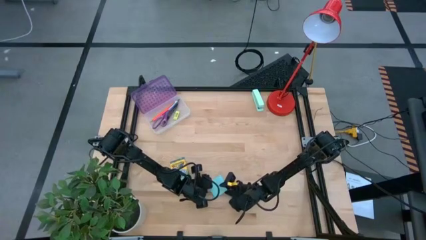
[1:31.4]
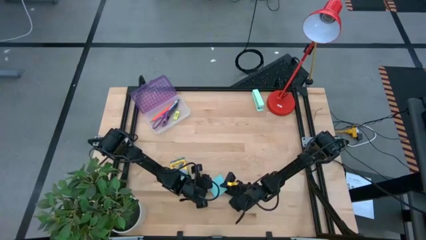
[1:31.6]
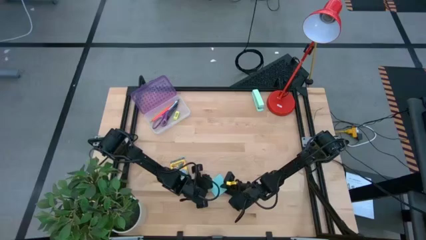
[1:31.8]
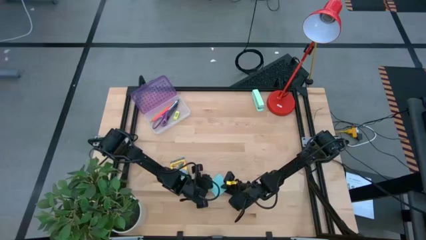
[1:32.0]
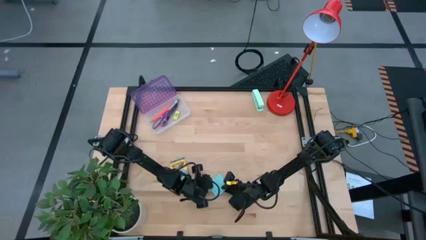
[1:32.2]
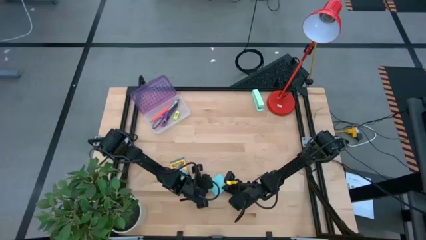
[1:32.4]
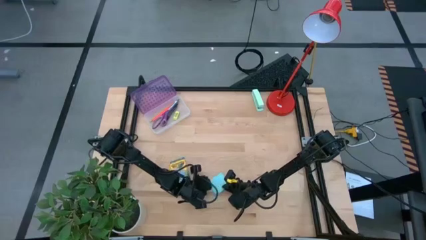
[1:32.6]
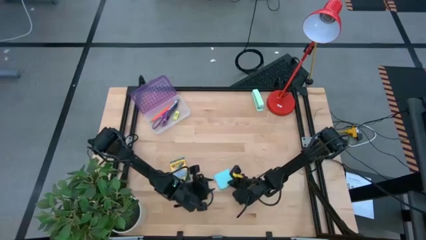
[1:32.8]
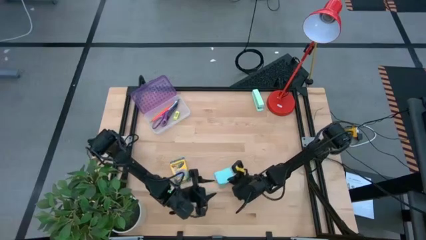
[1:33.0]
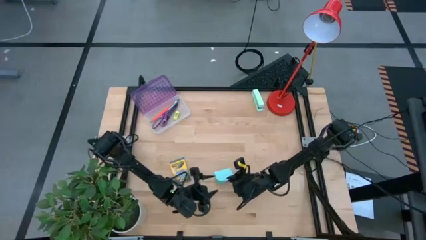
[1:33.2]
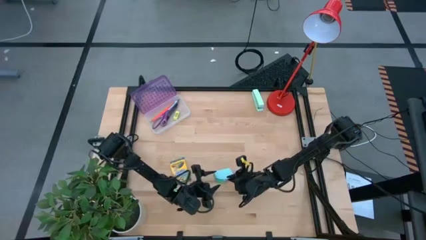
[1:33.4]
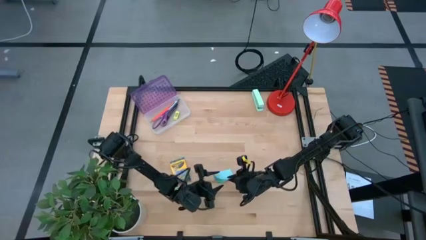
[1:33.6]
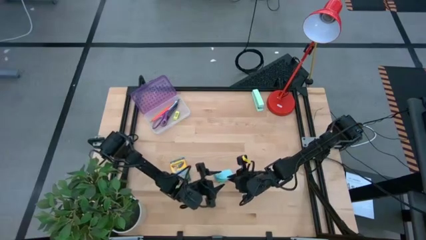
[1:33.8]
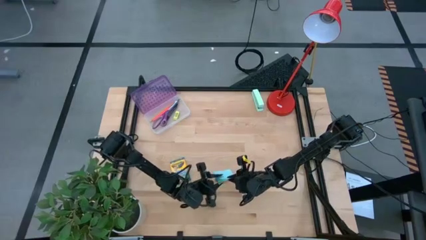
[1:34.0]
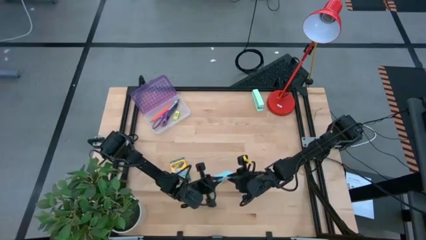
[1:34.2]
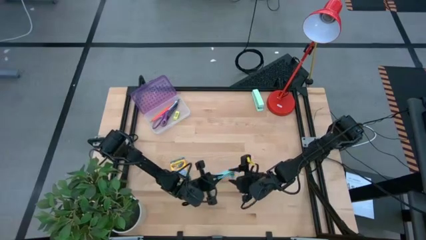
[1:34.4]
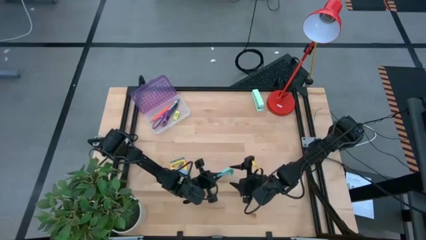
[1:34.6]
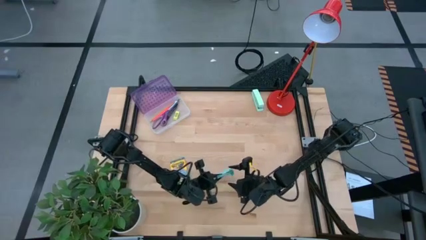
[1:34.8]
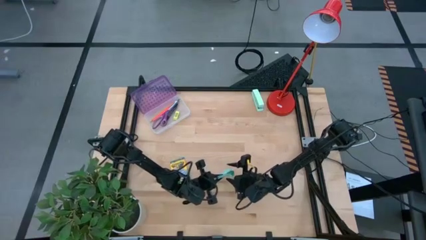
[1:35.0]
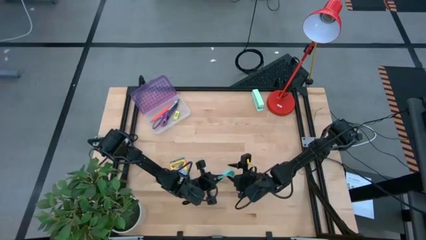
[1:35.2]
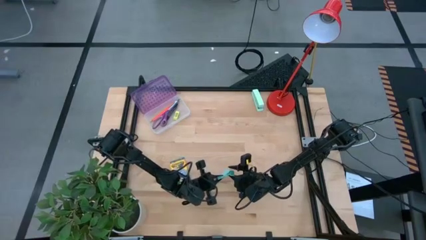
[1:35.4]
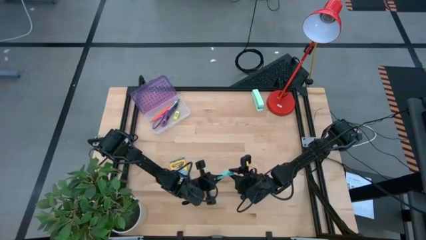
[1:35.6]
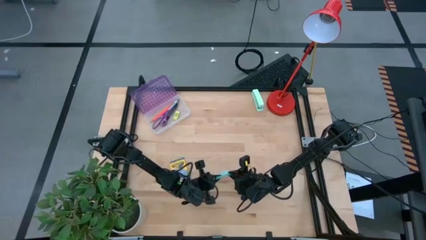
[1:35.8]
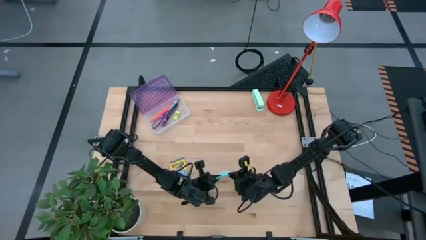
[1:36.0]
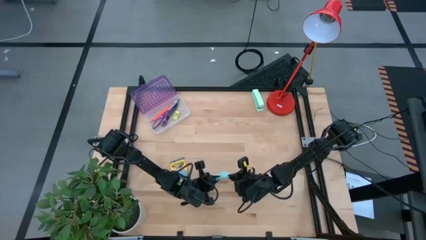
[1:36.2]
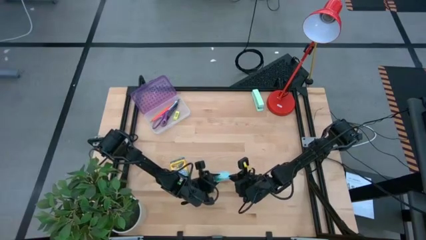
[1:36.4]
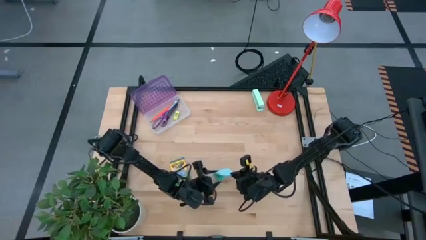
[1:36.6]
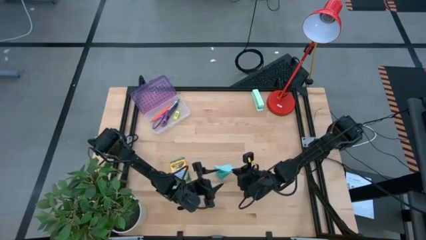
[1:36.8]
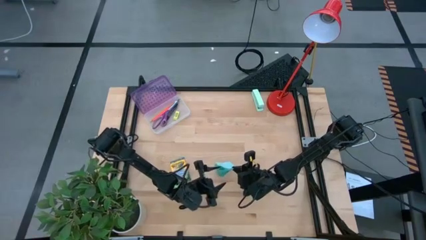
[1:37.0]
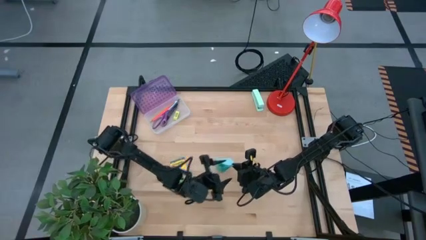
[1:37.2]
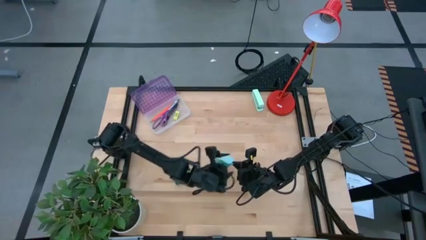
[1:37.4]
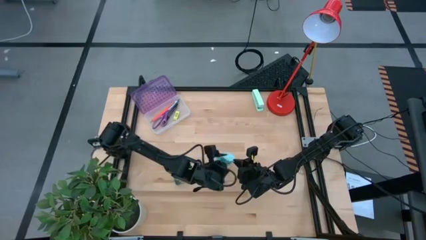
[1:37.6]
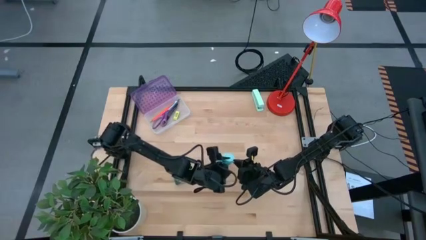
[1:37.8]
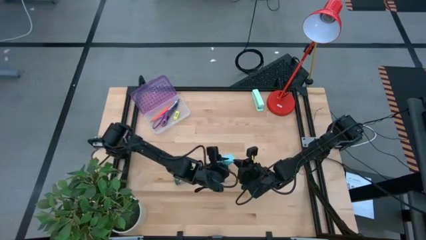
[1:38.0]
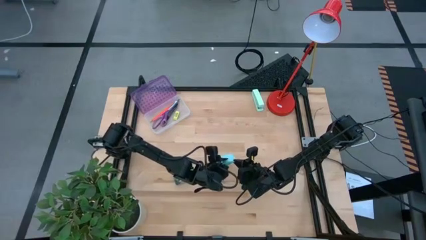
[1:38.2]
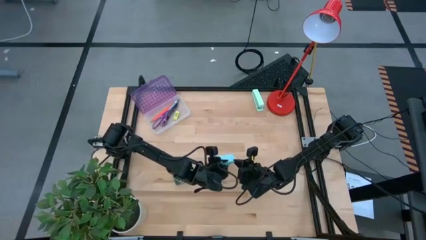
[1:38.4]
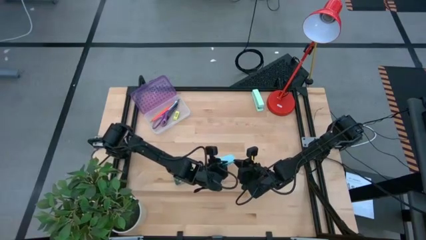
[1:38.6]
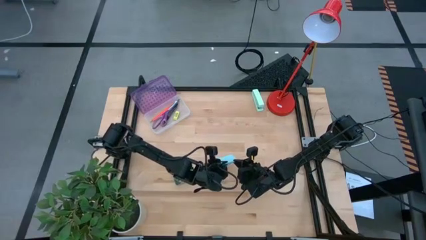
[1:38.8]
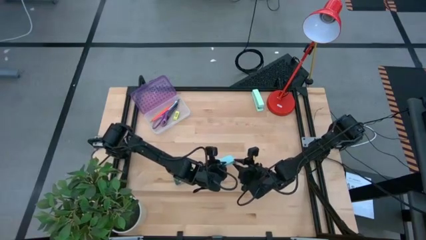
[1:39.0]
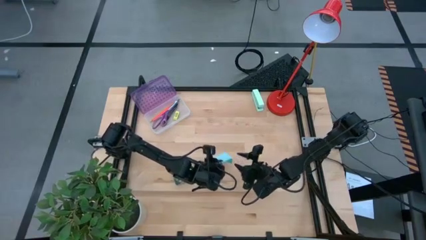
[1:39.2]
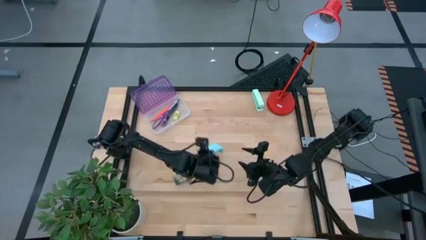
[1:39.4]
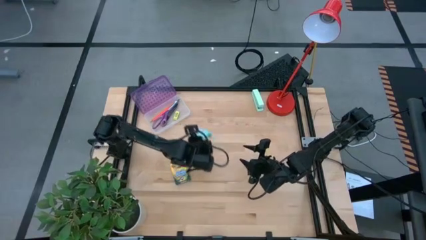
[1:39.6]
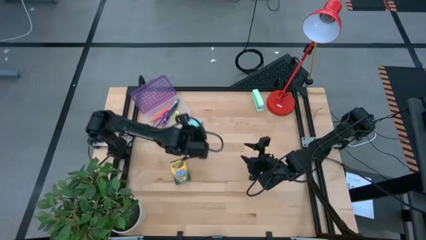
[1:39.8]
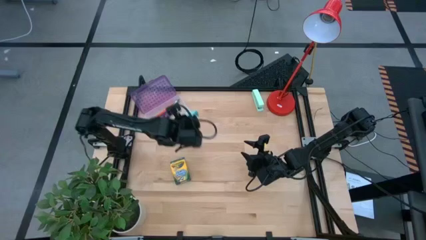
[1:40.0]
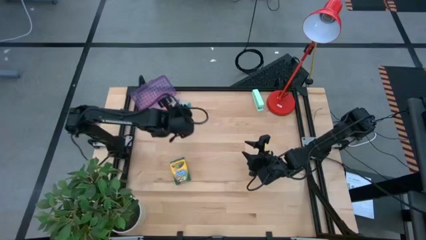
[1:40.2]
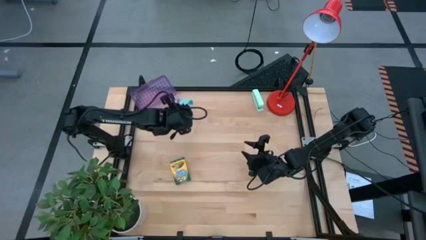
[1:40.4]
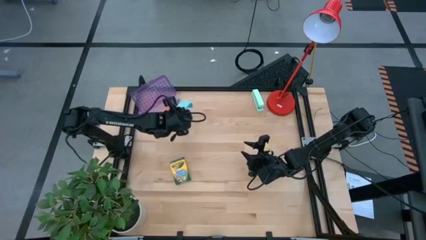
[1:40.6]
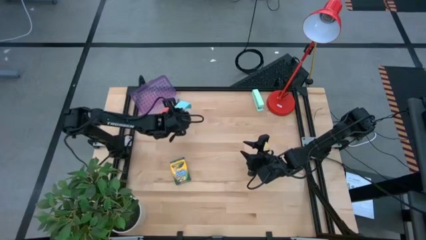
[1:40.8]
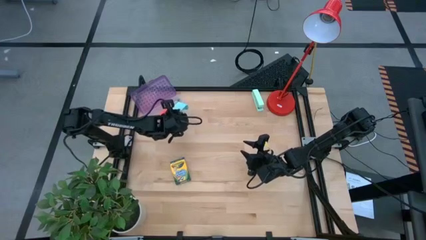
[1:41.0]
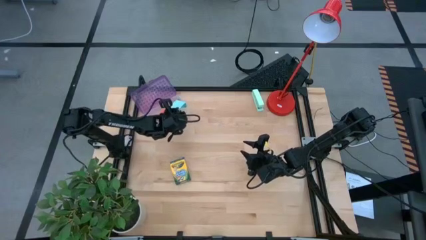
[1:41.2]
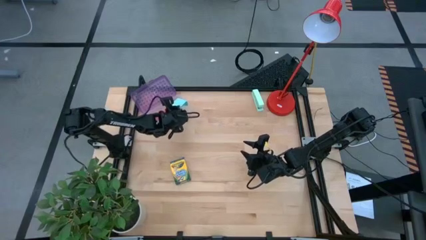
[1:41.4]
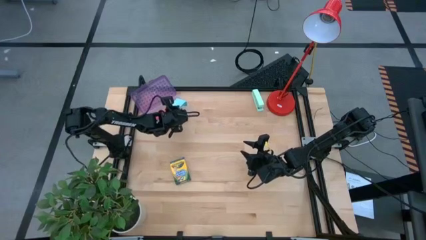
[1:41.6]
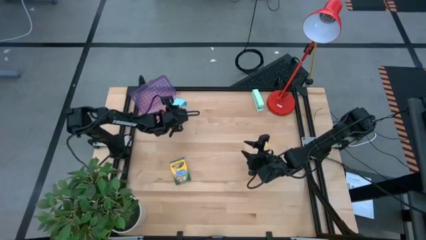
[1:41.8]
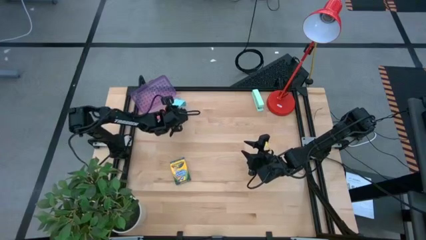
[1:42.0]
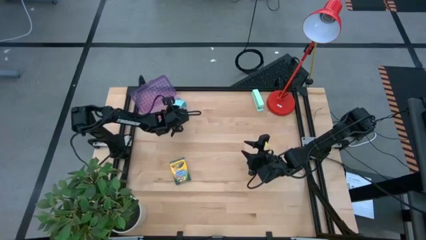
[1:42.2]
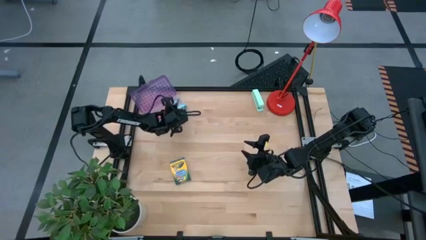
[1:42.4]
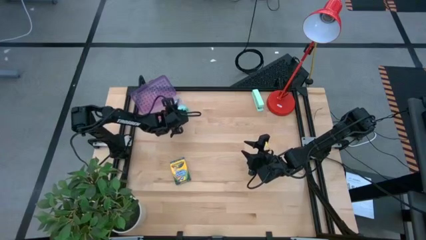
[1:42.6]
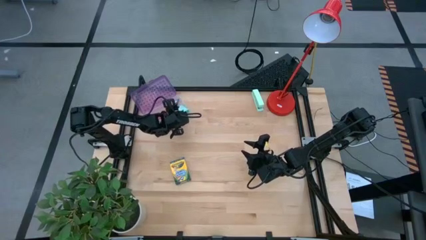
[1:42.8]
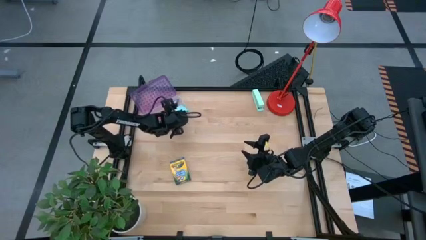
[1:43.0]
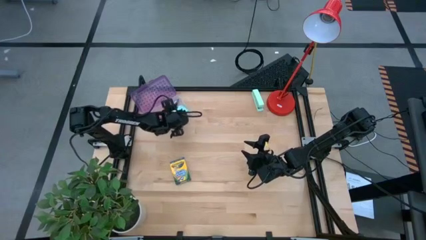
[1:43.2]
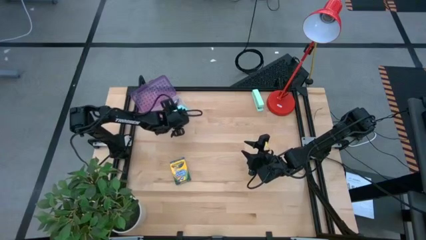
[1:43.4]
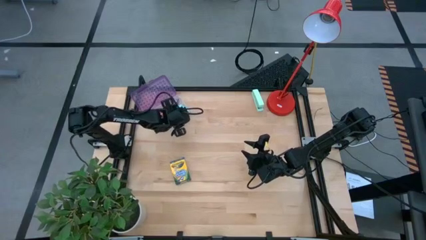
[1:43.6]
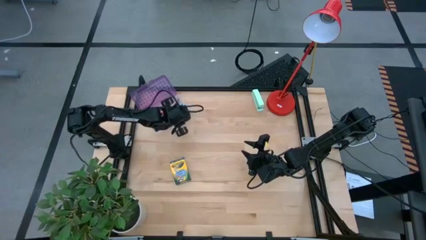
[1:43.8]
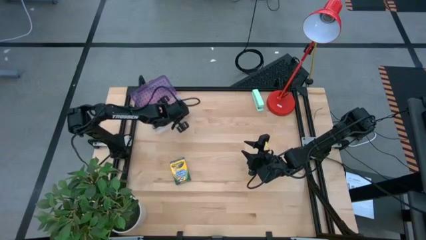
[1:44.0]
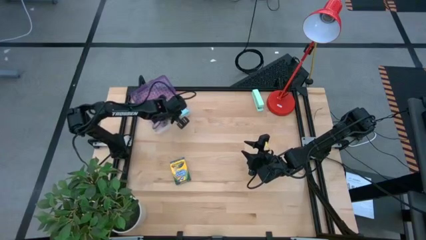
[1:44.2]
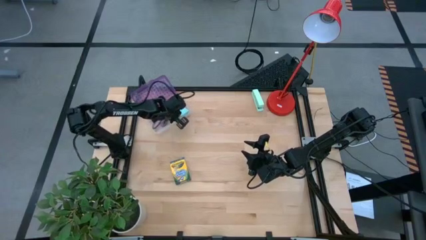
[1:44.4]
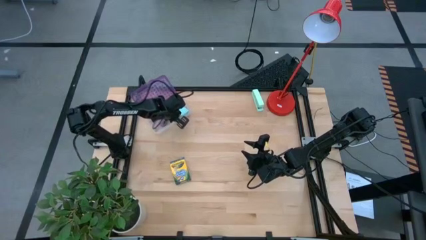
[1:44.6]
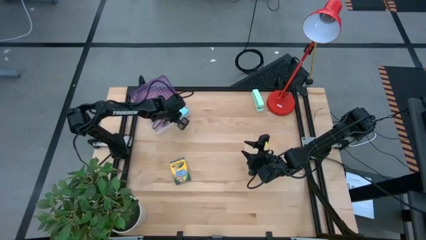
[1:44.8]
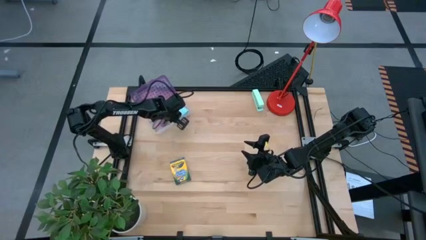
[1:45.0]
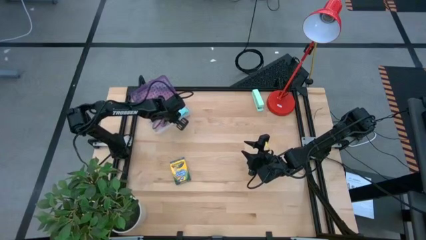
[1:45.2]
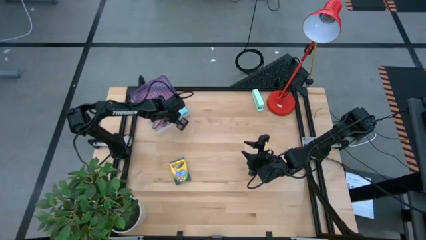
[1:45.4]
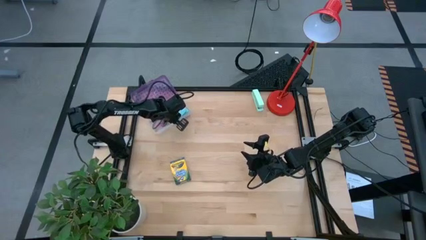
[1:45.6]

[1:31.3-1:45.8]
Task: Pack school essentials
Put the light blue sticky note into the purple supply box
